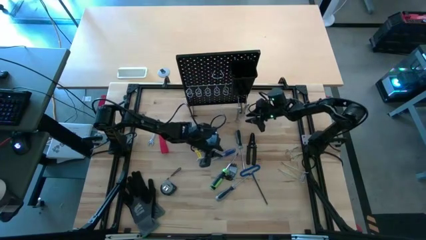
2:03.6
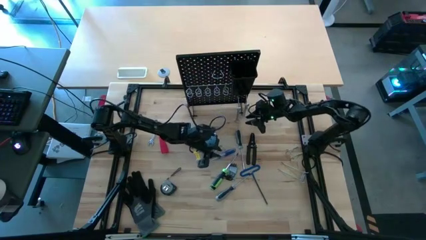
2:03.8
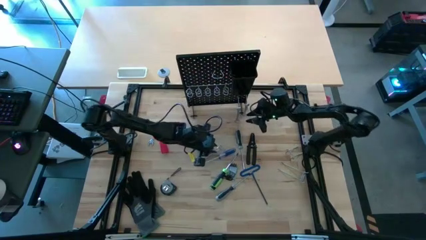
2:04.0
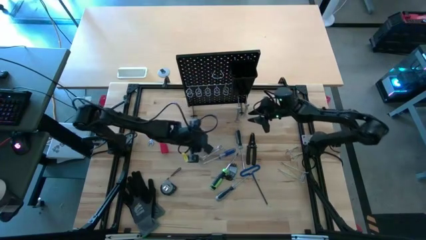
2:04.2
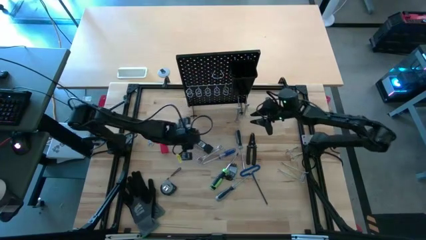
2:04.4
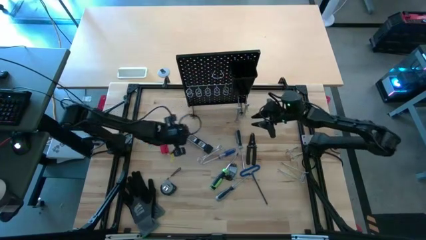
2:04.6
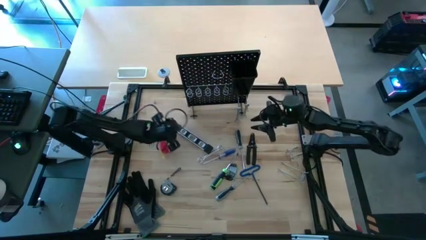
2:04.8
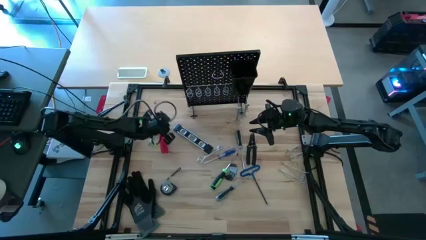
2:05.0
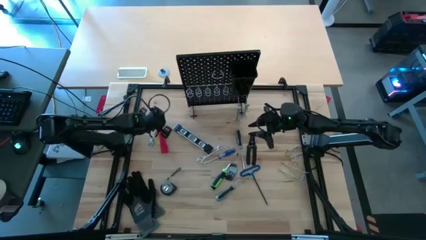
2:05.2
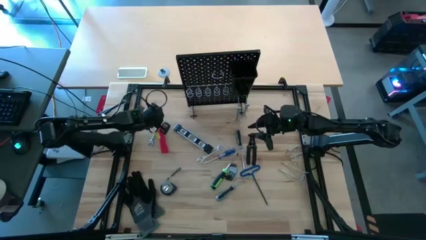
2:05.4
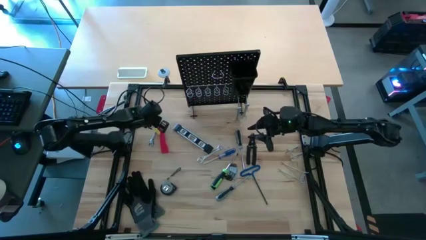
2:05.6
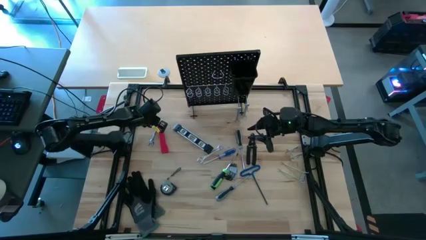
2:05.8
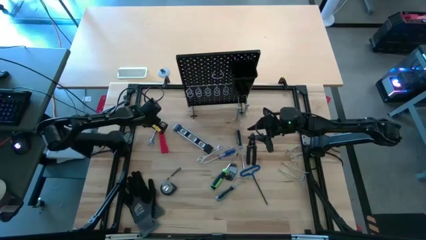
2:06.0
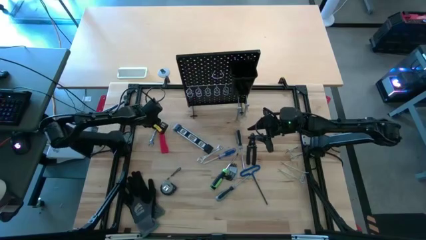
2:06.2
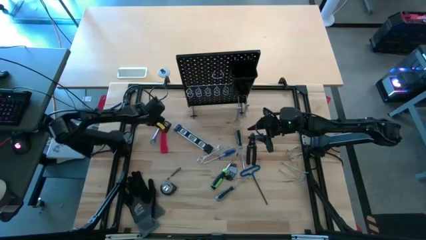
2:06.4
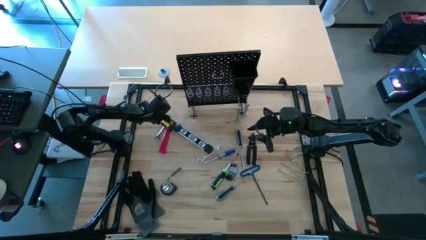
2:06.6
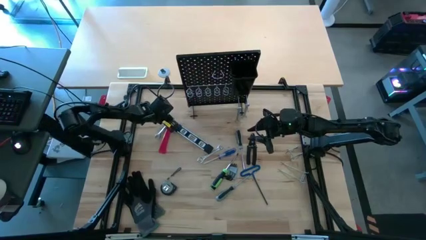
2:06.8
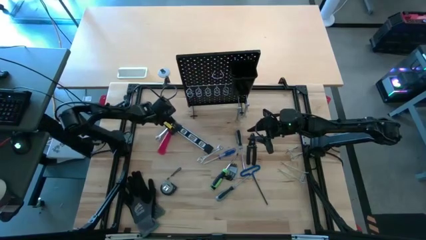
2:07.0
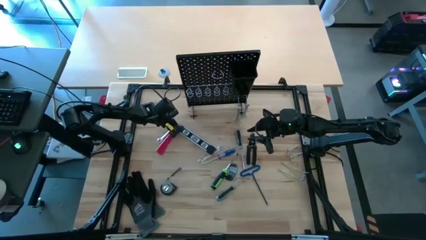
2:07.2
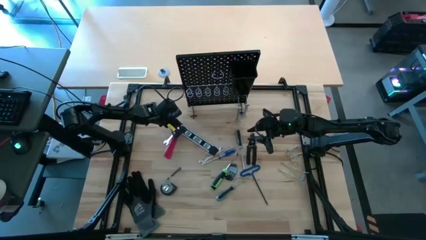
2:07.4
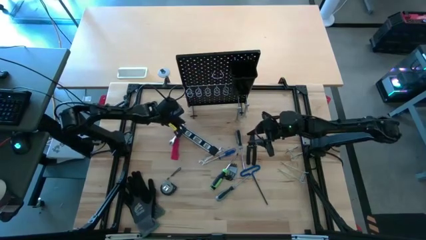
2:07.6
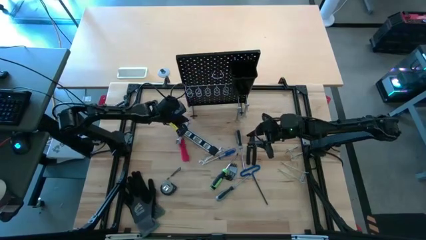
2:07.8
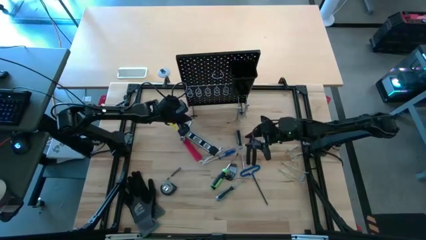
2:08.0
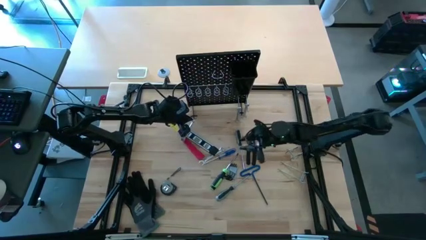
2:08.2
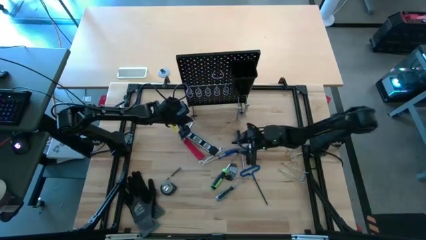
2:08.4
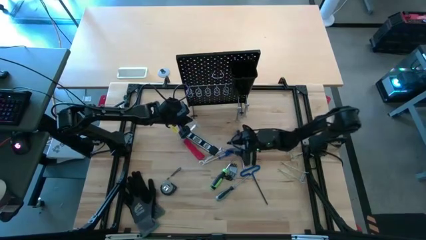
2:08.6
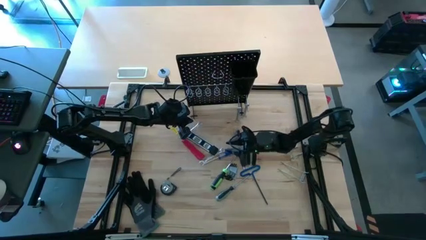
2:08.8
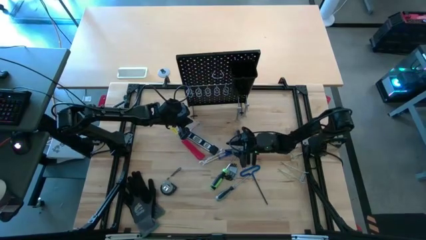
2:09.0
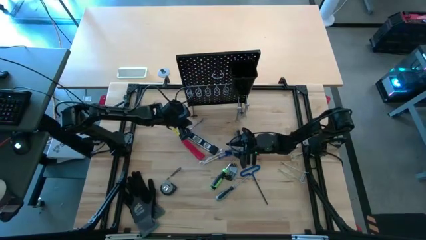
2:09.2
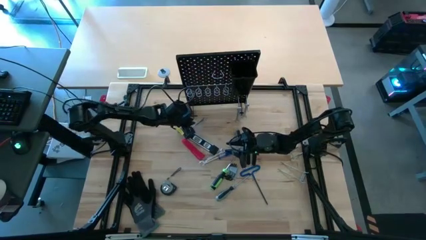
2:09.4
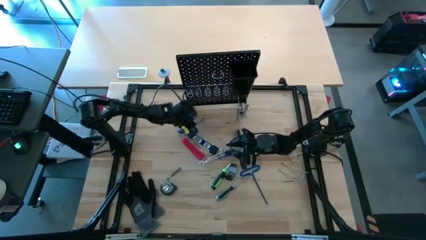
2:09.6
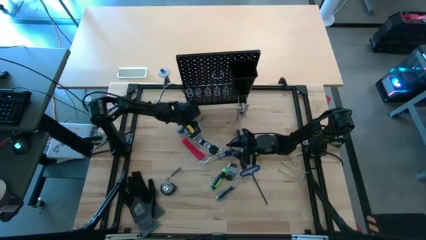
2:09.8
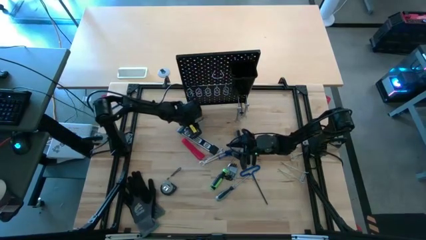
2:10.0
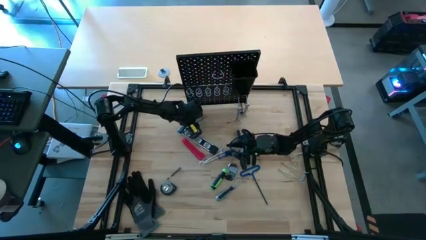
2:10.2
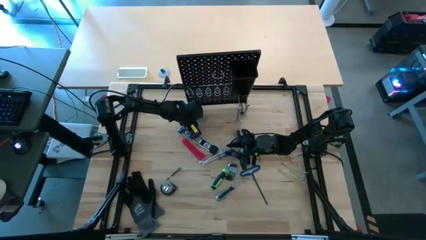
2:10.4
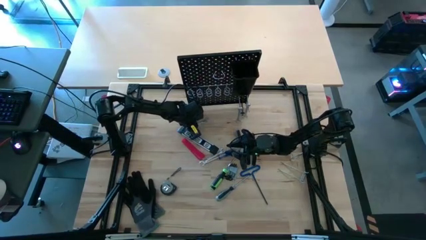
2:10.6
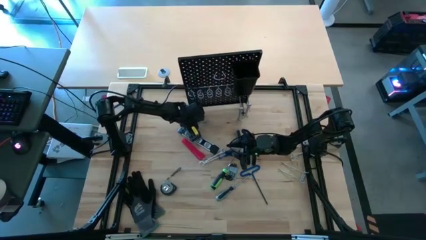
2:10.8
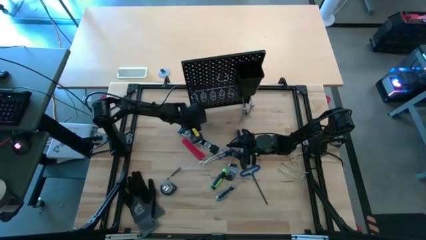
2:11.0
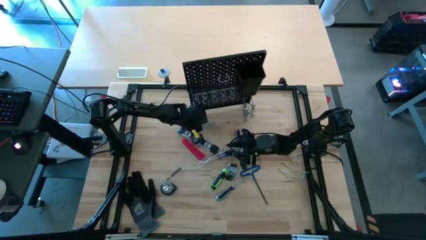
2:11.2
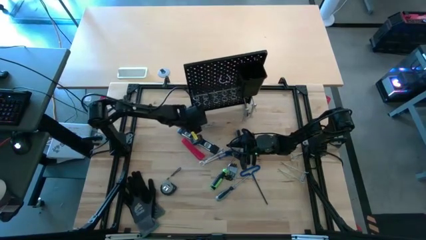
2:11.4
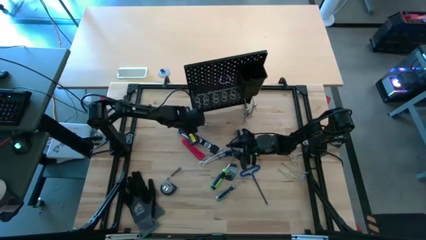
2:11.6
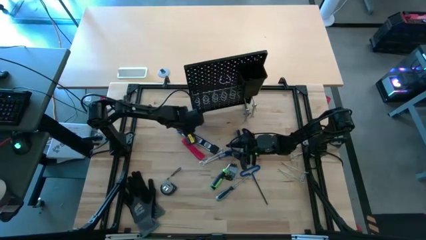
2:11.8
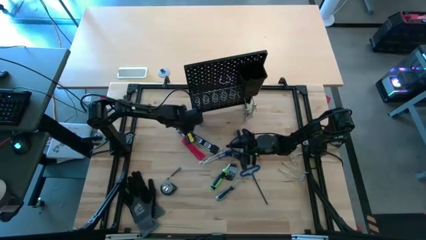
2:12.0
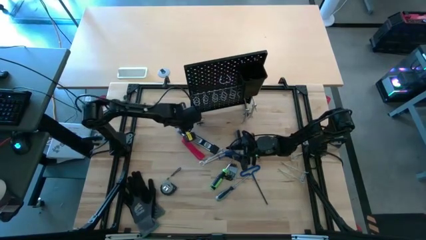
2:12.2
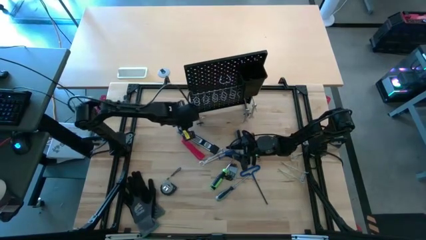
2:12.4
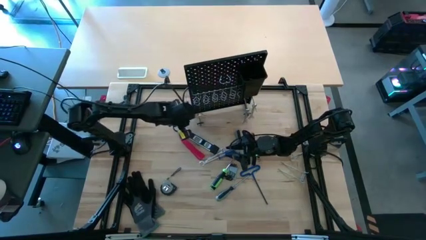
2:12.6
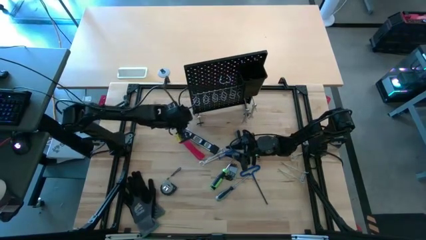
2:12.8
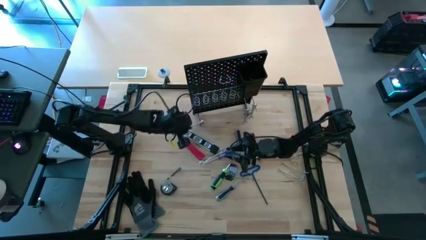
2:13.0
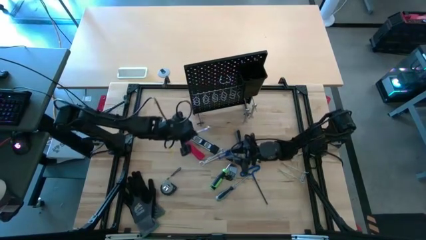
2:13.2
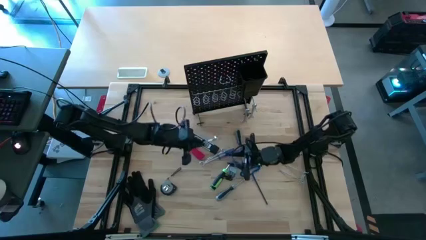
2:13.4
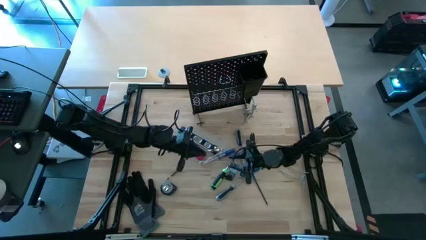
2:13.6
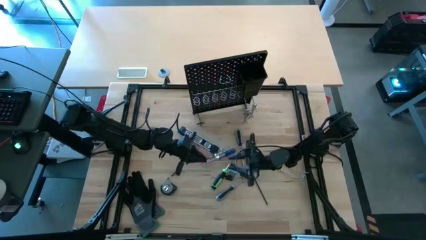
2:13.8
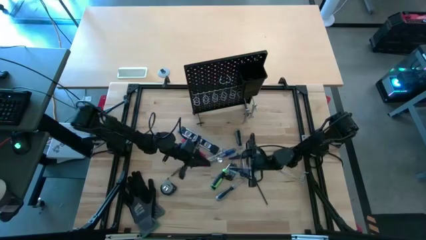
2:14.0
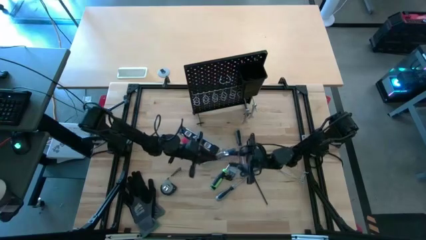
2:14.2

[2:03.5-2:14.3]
Task: Hang tools onto peg board
Hang the left wrench onto the pegboard

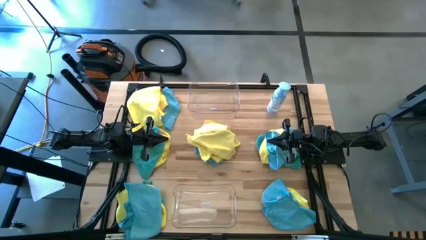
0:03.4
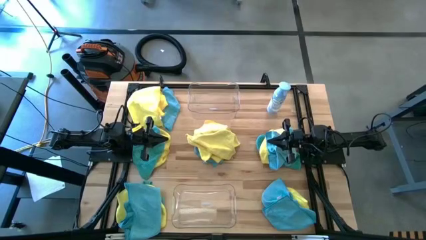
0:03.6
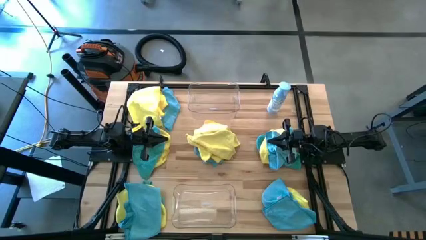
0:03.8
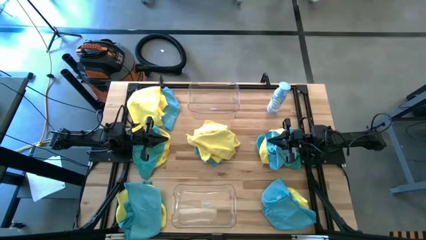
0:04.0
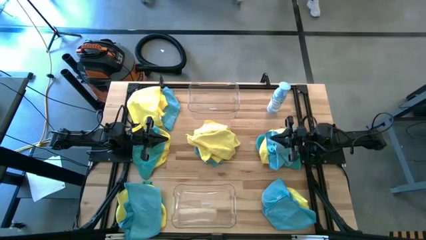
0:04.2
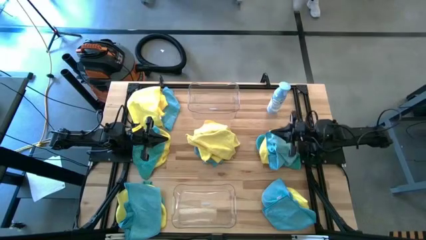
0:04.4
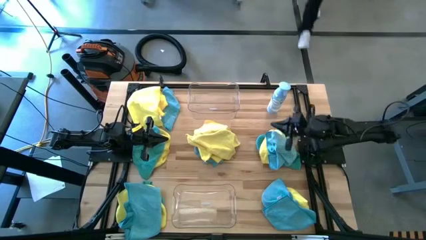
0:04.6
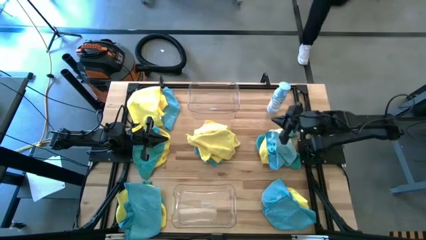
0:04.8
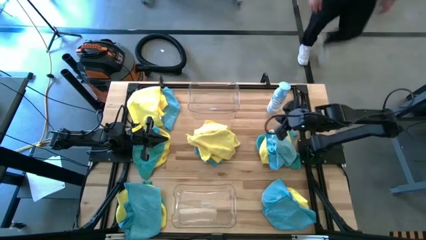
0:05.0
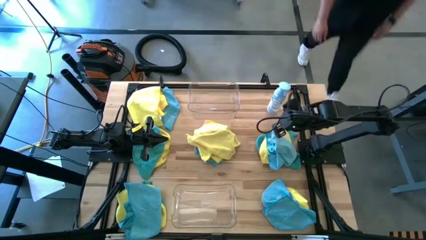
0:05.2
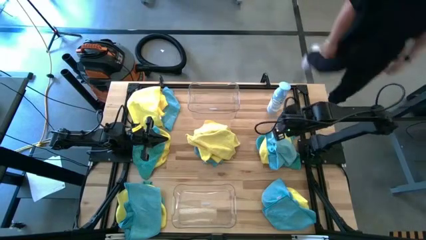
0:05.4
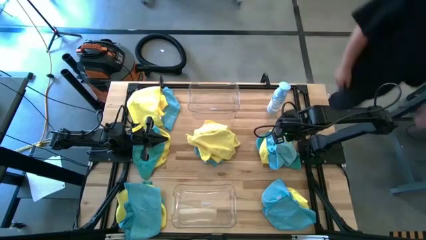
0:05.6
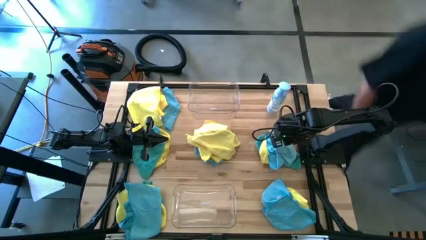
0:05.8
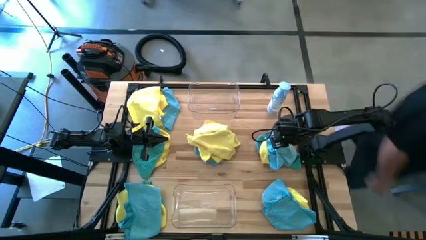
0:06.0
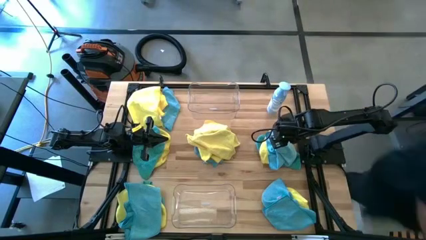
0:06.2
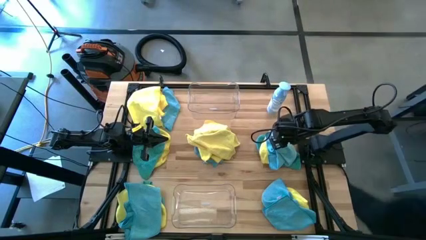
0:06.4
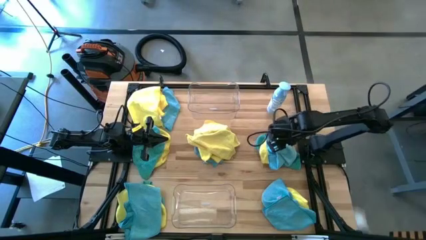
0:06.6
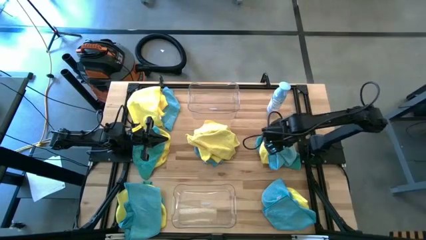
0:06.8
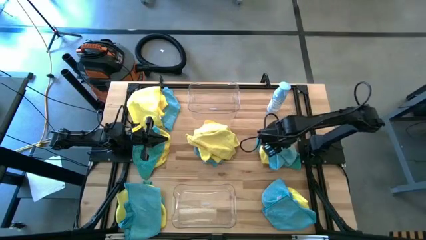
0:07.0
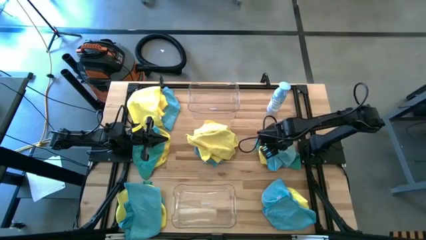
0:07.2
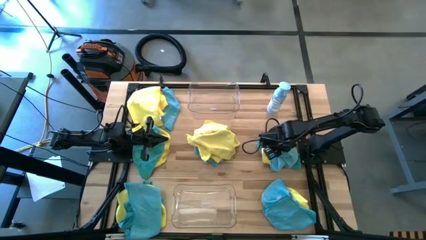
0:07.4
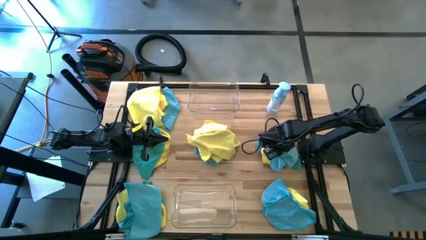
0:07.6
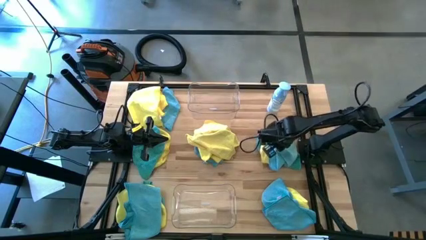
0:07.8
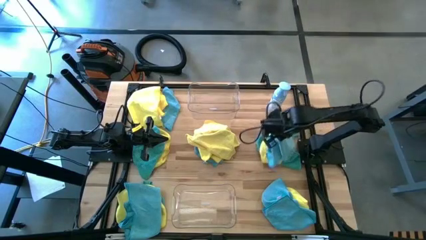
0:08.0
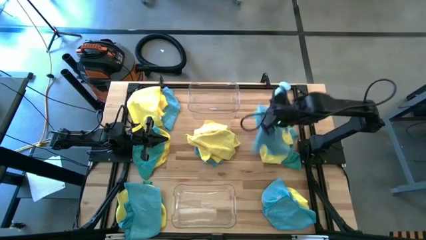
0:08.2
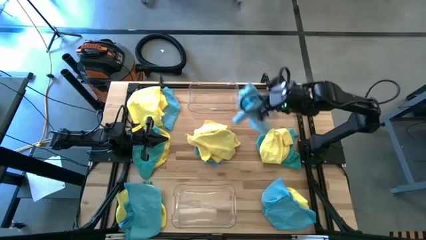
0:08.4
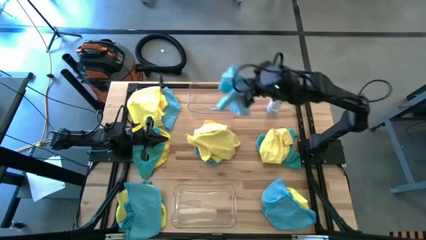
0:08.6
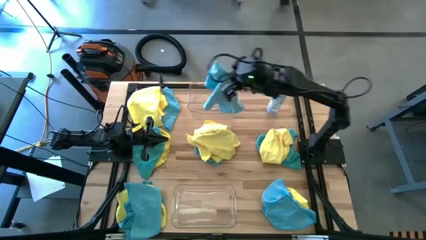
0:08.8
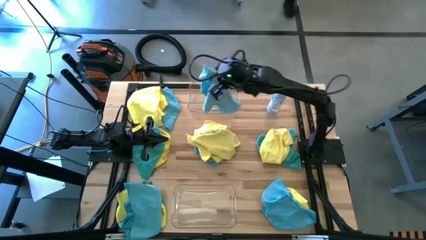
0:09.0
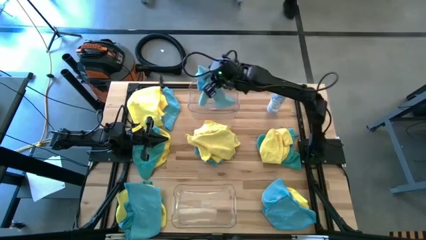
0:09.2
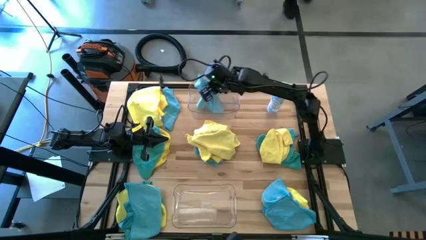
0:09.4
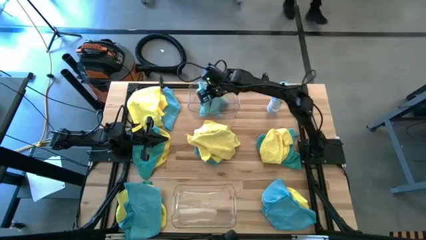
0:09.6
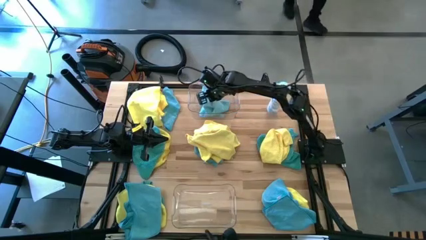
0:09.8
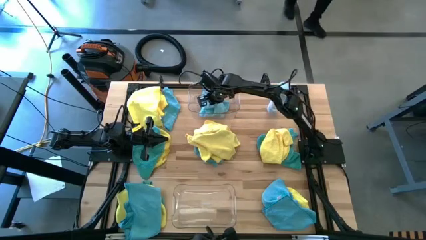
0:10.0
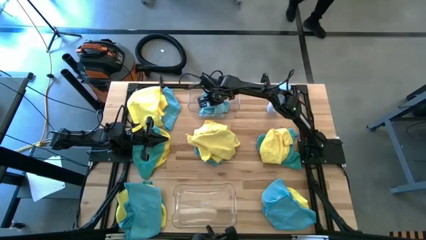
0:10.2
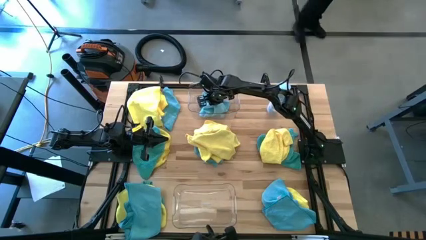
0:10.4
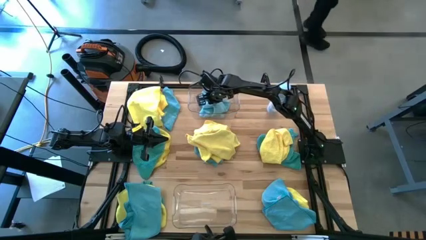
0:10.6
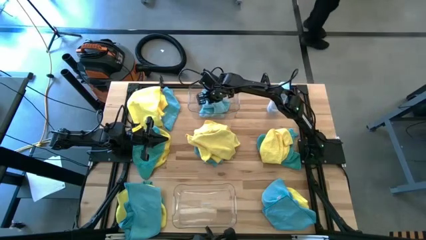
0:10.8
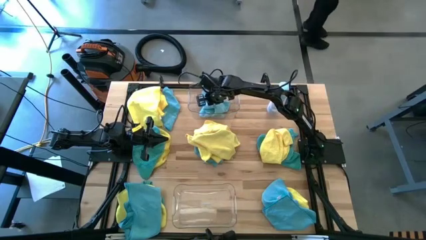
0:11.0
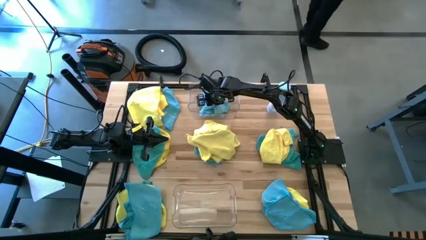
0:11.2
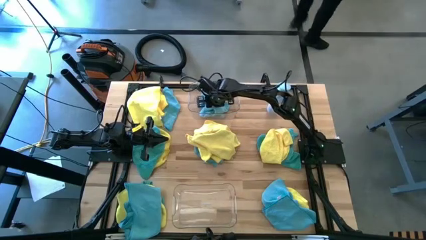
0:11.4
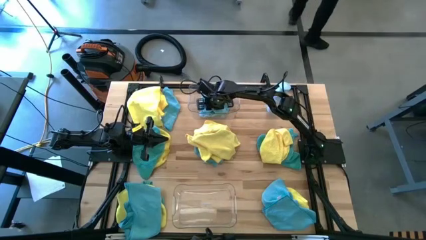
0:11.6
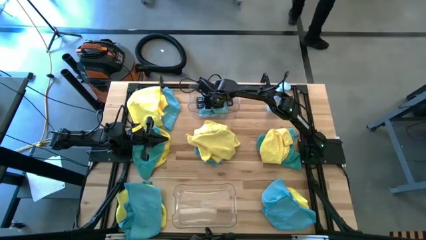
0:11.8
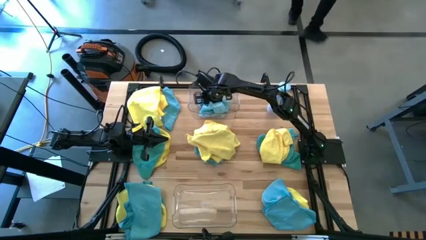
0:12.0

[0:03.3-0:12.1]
Task: Sort microfiber towel by color & place in baskets
Put the blue microfiber towel into the top transparent bin
